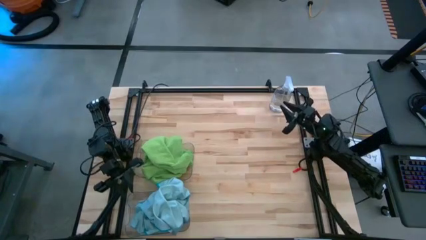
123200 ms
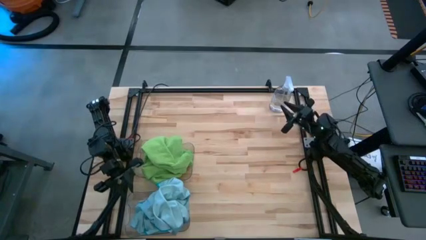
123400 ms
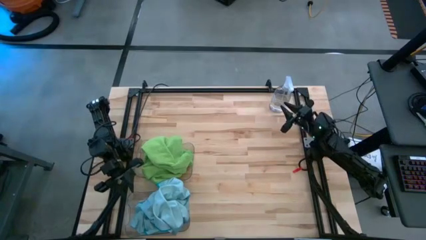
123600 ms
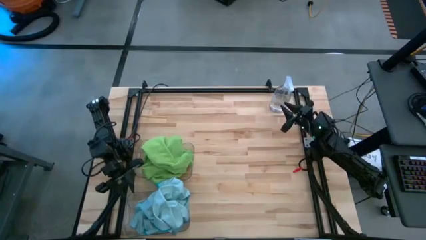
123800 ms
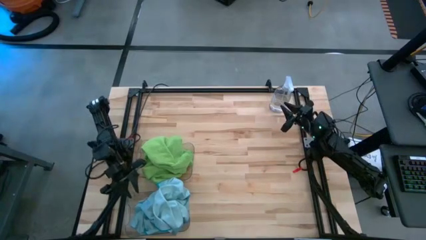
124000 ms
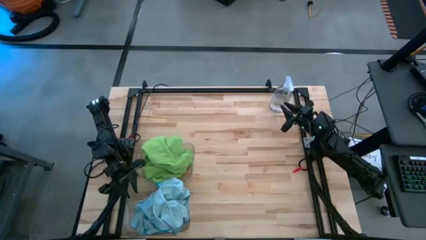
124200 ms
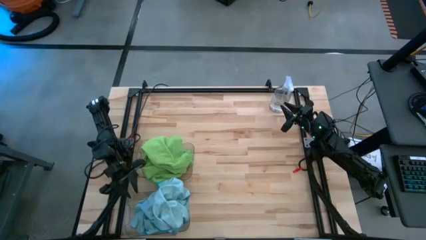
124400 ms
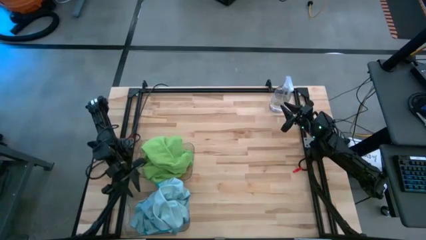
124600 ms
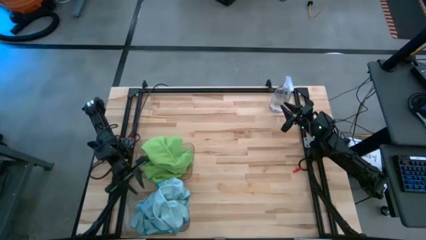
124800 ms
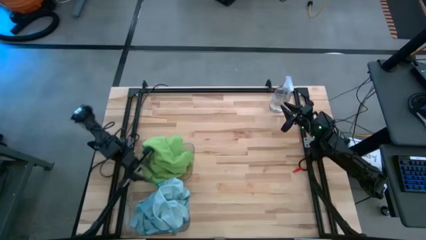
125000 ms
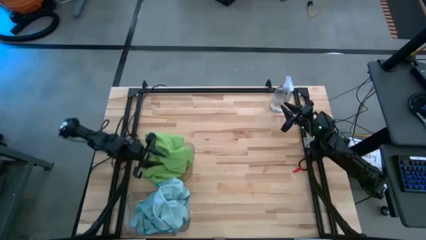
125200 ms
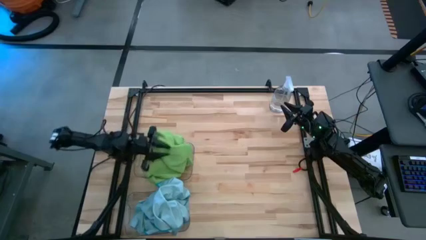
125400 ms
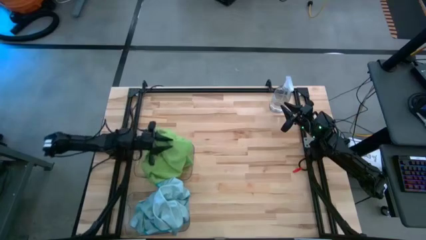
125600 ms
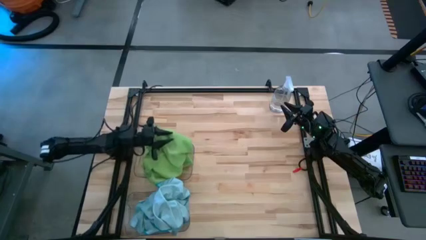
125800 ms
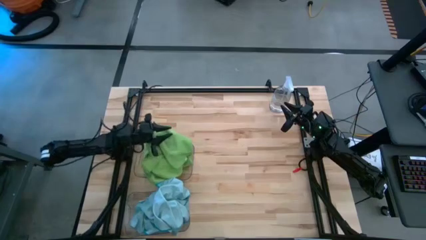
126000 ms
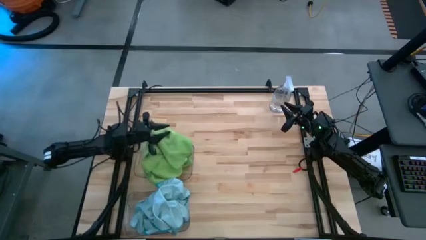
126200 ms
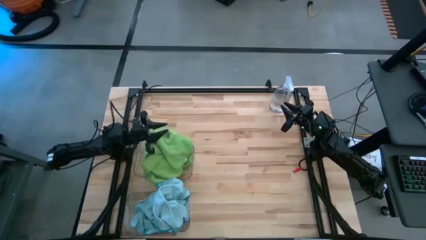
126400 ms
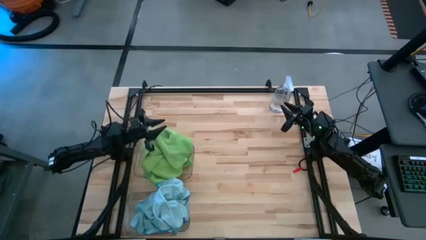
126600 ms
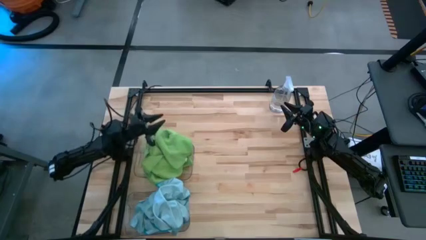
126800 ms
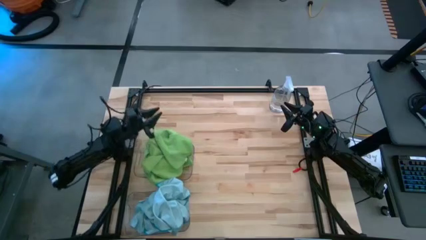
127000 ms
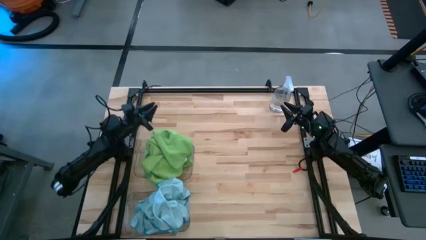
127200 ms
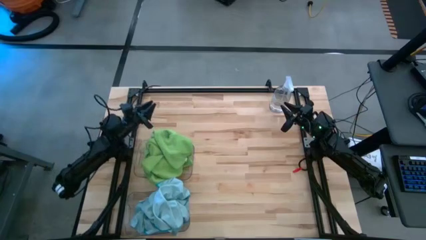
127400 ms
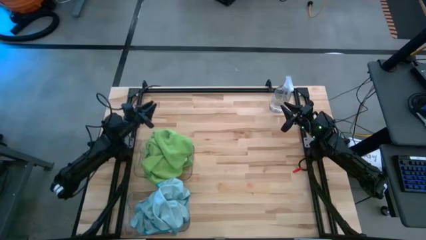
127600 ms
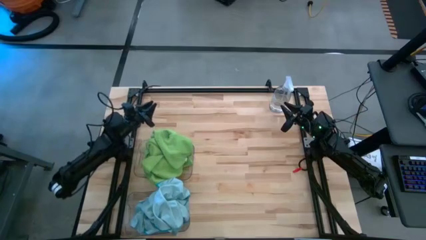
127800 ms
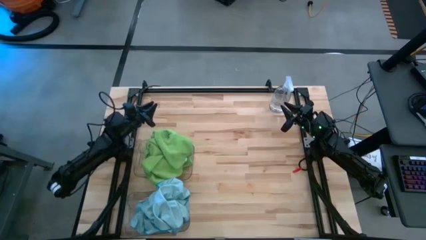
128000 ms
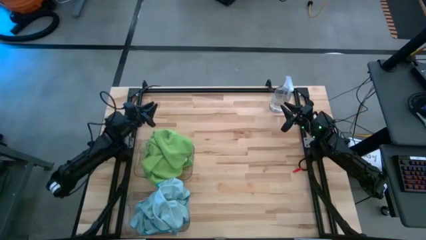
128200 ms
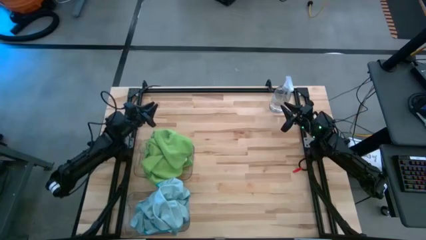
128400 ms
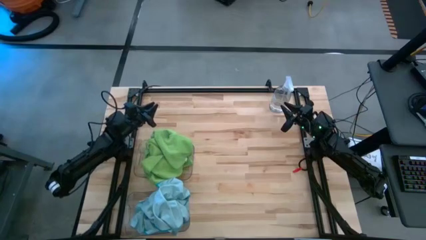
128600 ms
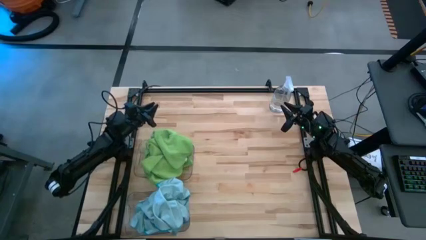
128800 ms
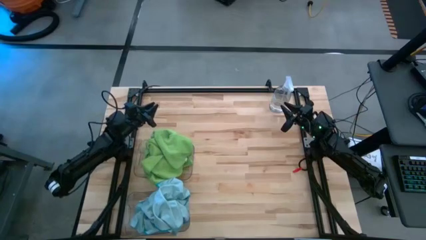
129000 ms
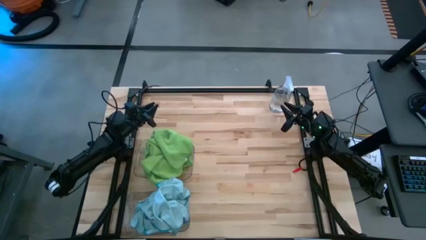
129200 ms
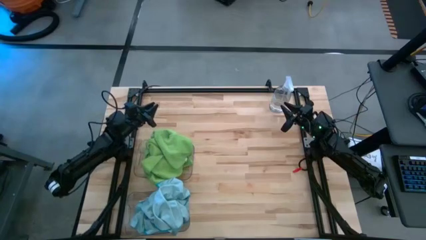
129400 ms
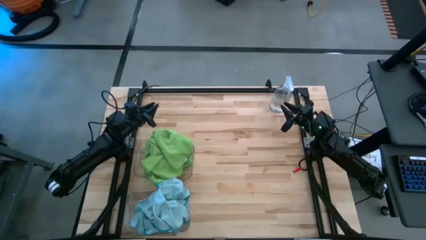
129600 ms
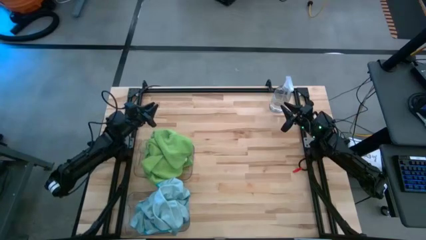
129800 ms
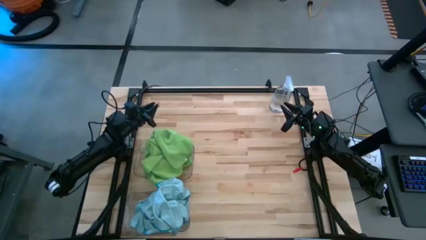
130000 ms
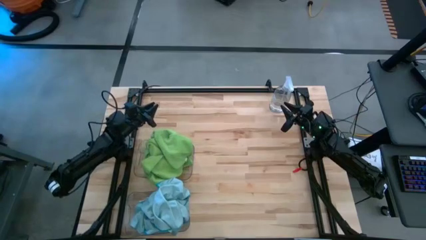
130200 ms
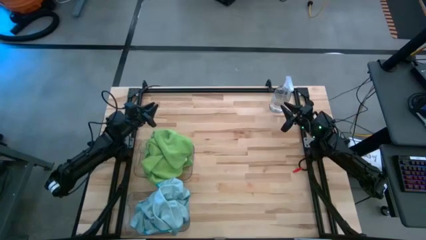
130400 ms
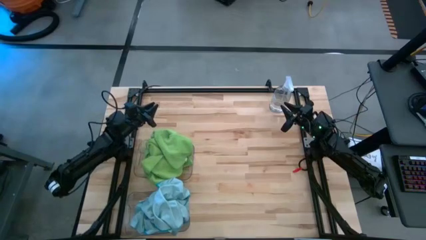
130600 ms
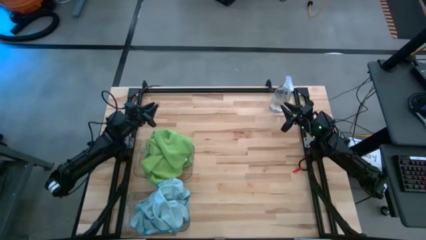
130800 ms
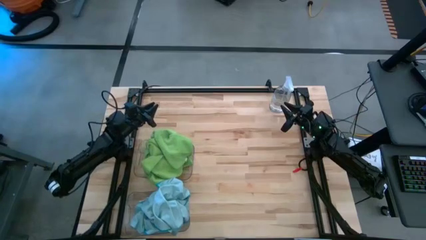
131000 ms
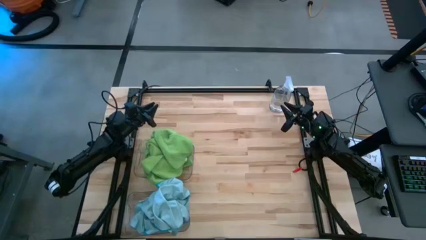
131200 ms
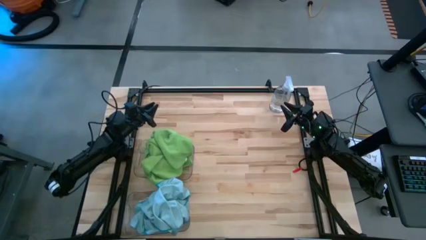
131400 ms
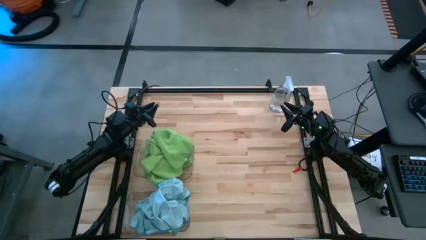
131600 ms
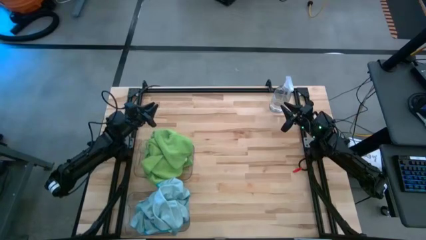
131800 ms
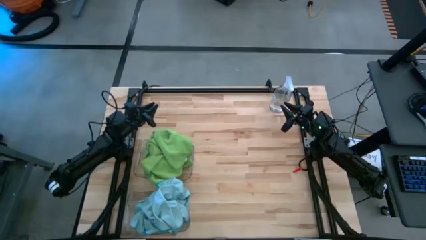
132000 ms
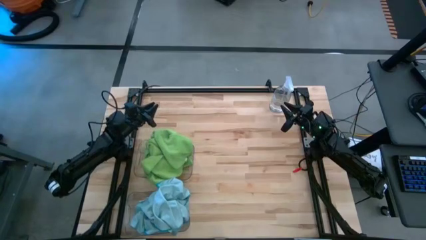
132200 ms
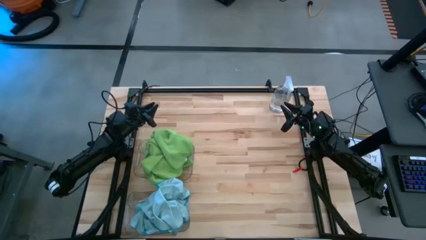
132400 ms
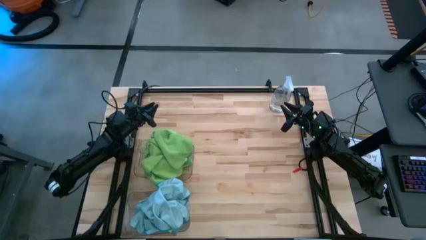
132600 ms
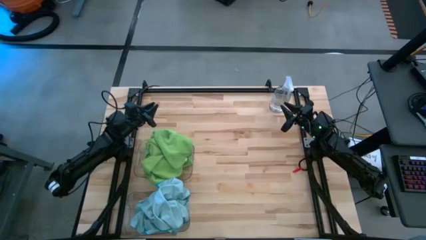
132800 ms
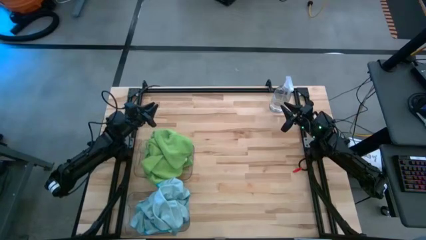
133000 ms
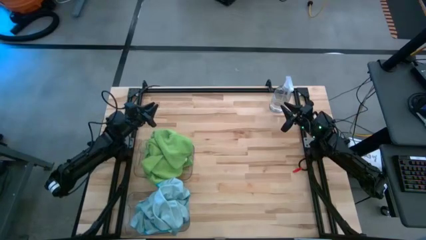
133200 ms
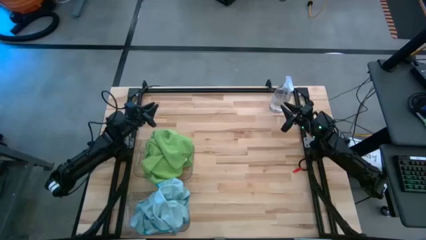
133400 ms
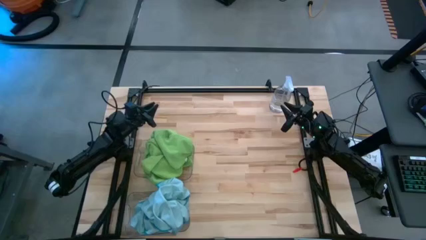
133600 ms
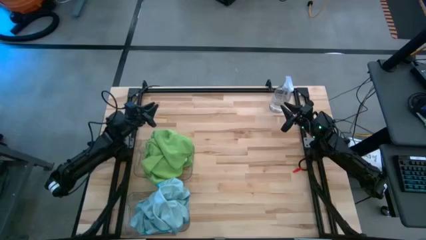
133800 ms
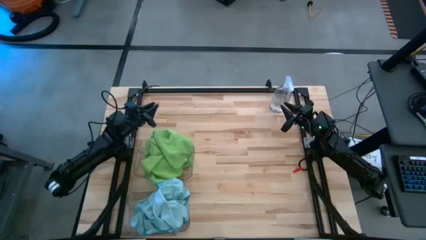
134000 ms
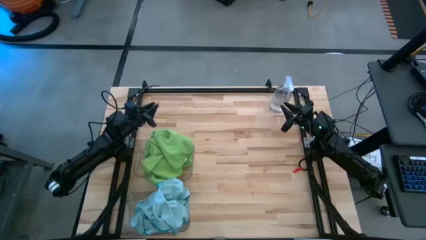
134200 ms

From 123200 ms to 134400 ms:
Task: Sort microfiber towel by color & place in baskets
Return to Home Position

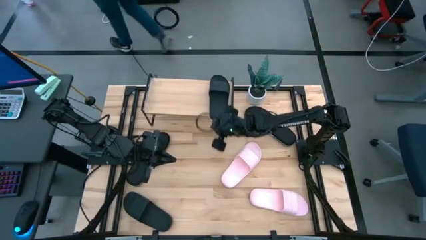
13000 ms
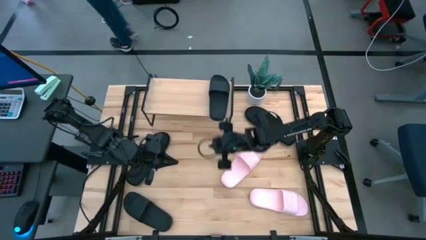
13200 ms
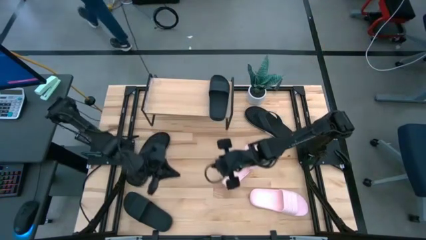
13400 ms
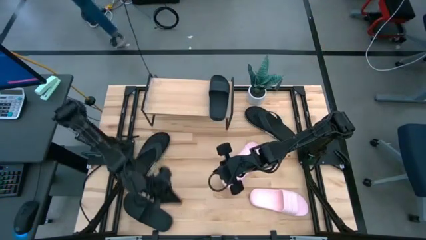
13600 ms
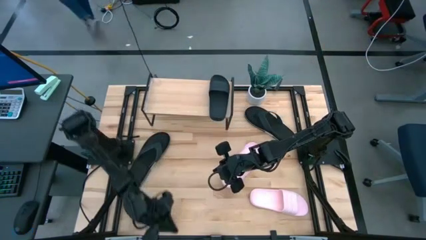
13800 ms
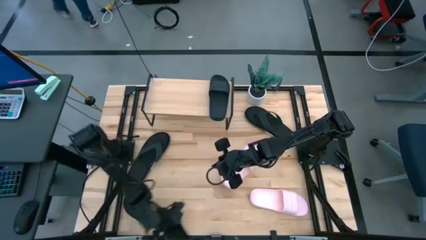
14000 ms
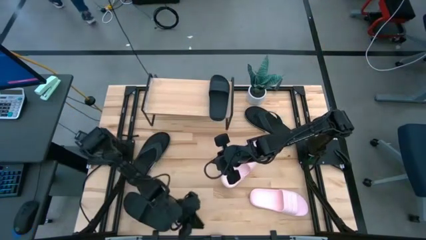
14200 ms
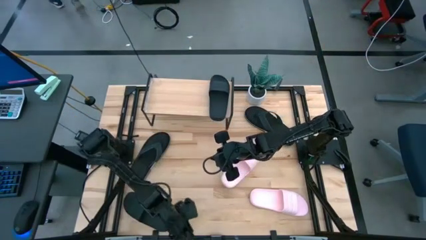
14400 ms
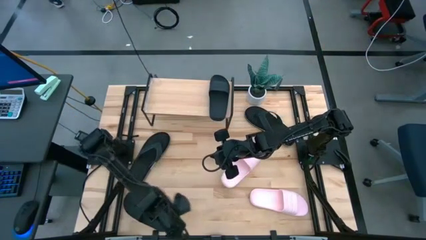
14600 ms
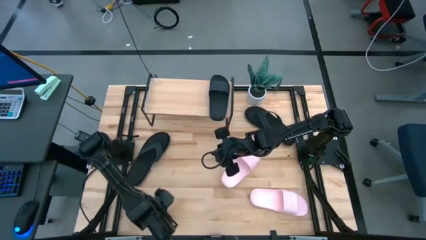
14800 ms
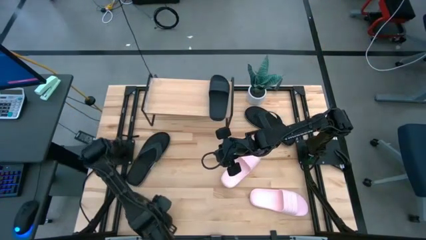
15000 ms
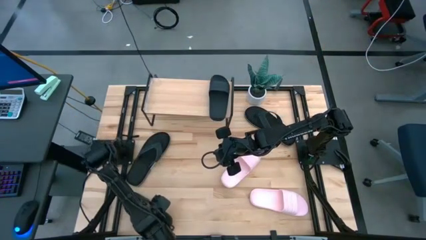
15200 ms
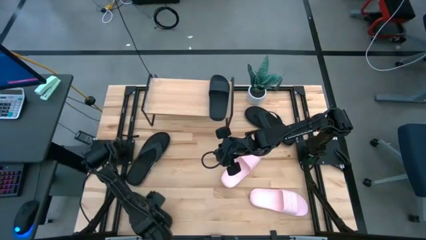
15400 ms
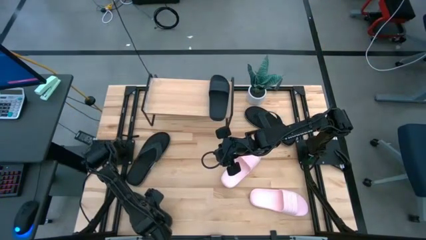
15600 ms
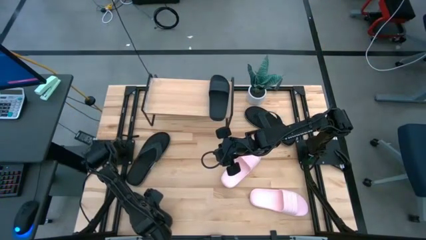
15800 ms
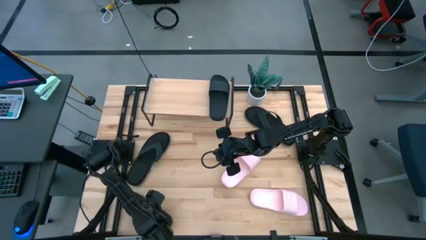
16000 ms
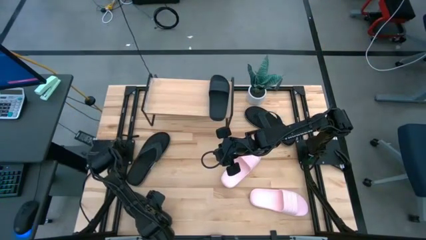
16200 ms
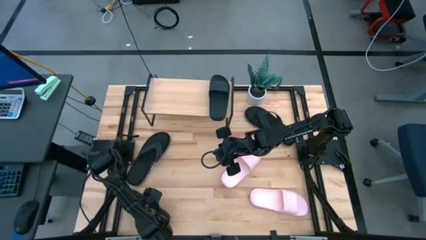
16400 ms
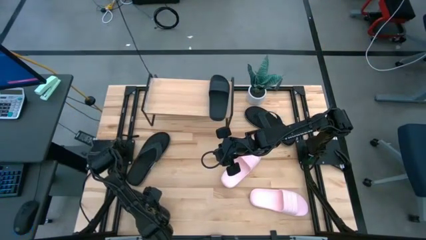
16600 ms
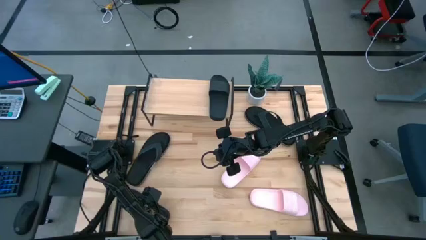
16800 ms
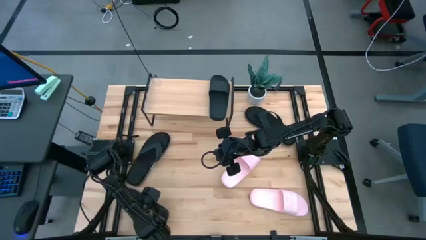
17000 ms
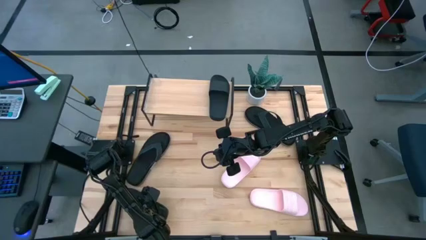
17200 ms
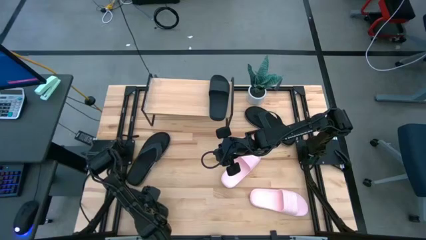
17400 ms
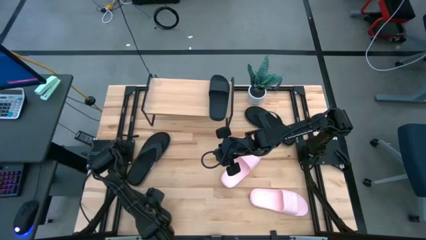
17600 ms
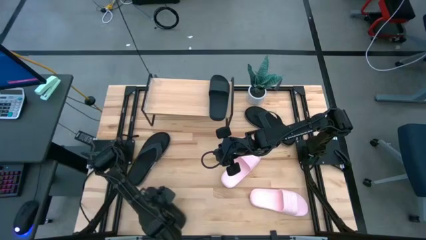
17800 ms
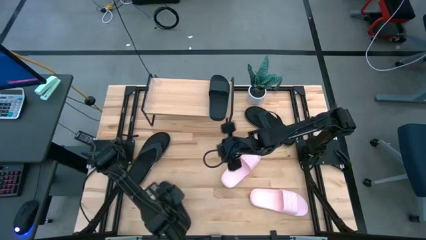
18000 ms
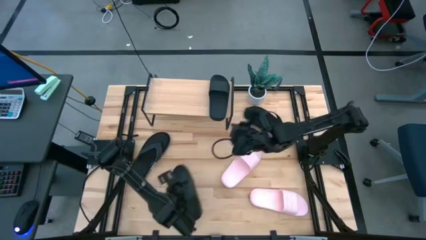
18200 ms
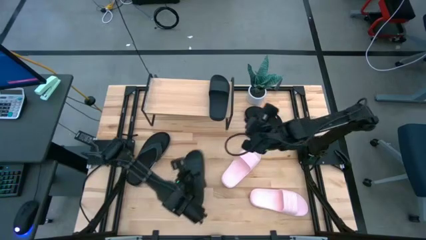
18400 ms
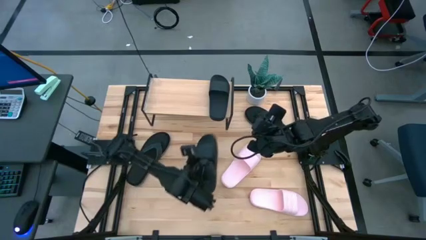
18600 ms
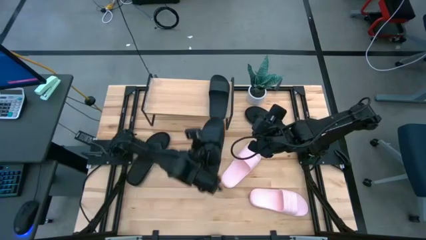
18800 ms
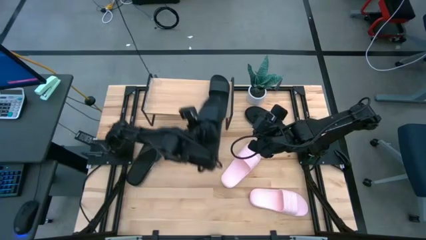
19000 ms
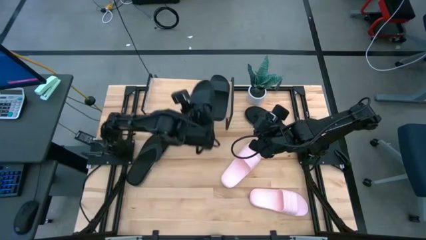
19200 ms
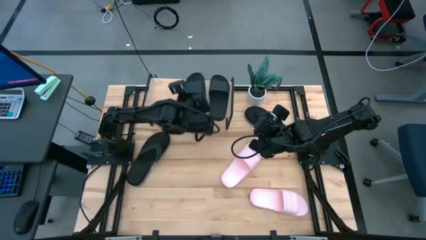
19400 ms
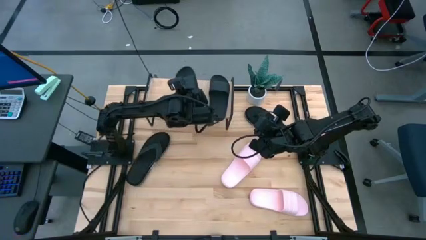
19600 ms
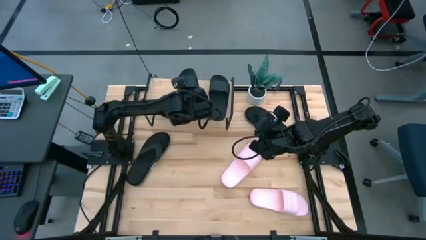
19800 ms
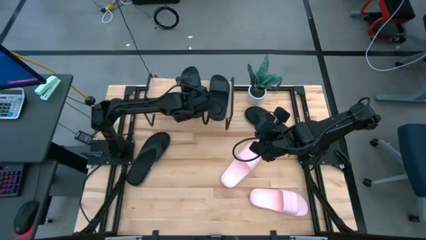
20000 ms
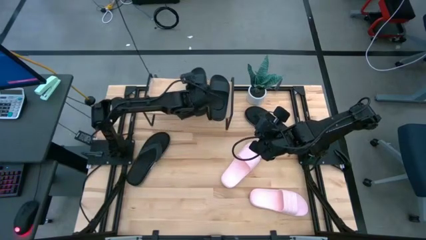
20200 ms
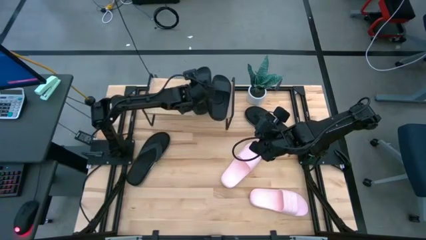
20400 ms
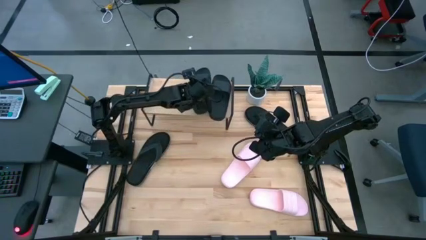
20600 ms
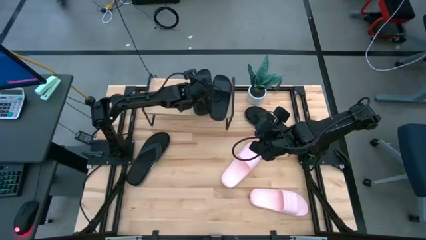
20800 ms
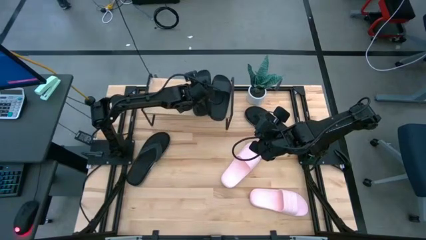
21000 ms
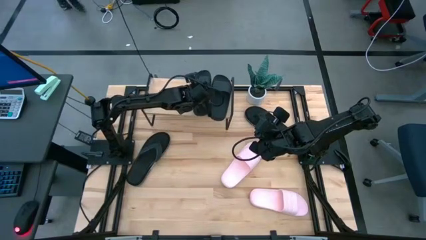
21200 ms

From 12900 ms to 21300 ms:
Task: Pick and place slides into the shelf
Put the black slide on the shelf
